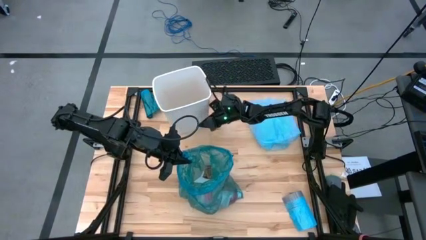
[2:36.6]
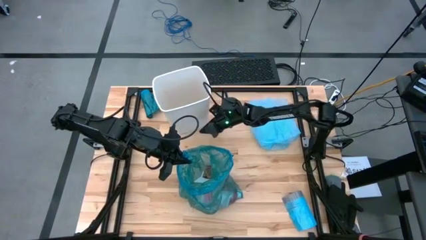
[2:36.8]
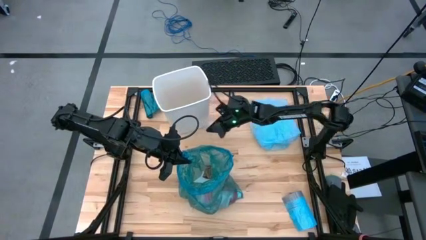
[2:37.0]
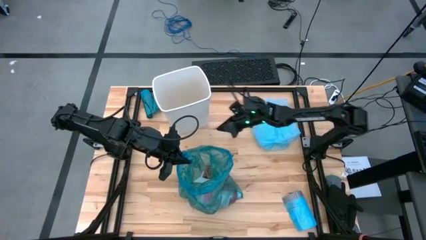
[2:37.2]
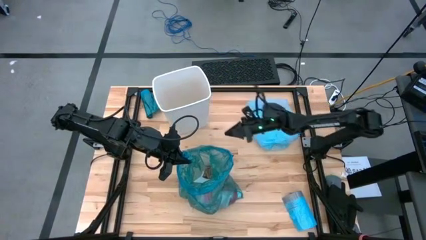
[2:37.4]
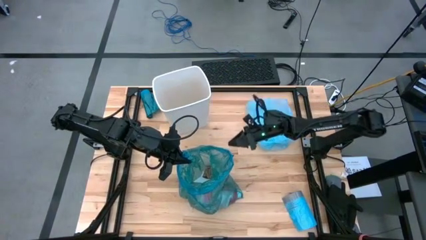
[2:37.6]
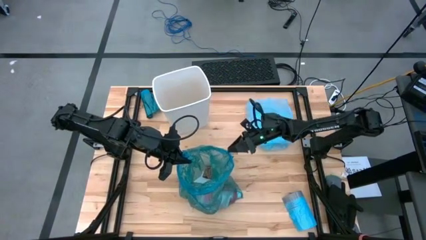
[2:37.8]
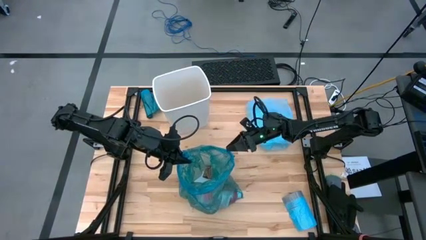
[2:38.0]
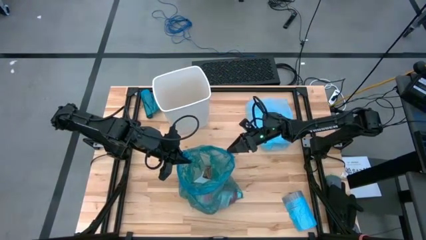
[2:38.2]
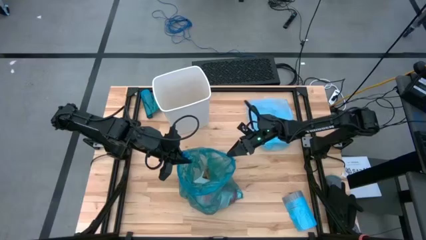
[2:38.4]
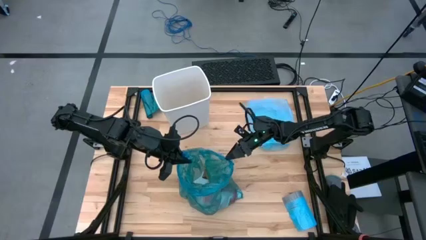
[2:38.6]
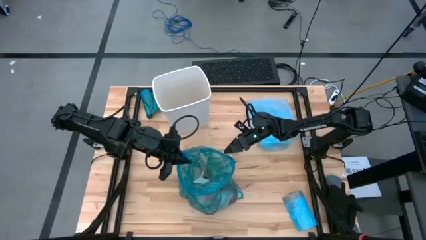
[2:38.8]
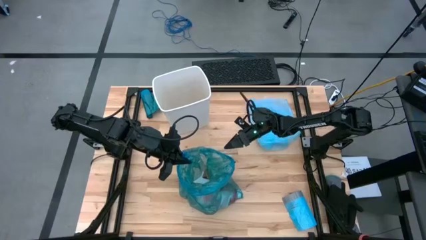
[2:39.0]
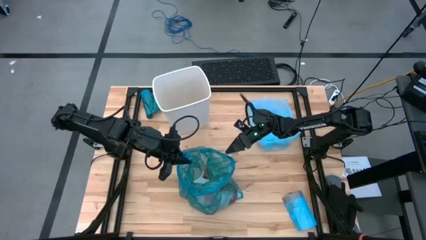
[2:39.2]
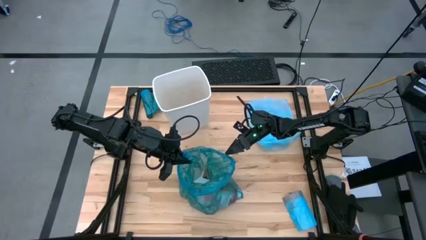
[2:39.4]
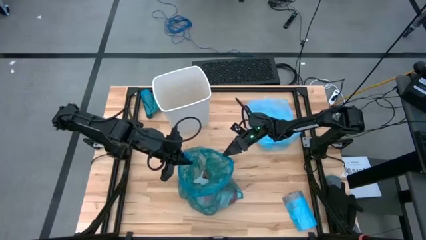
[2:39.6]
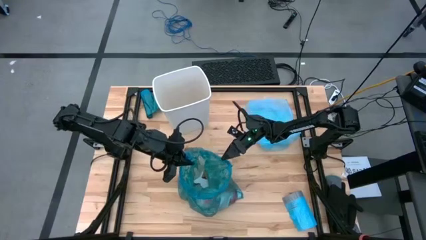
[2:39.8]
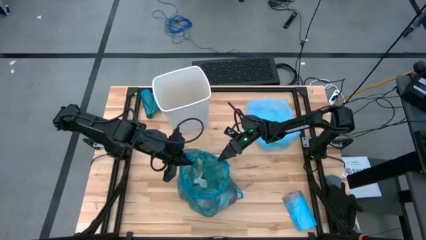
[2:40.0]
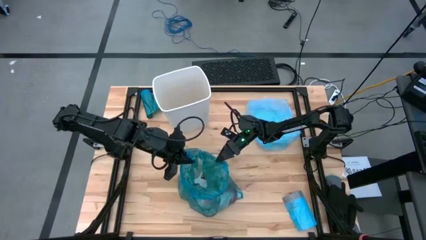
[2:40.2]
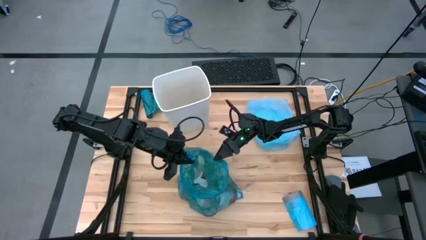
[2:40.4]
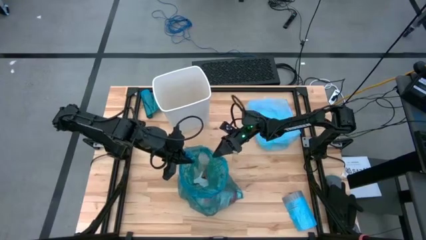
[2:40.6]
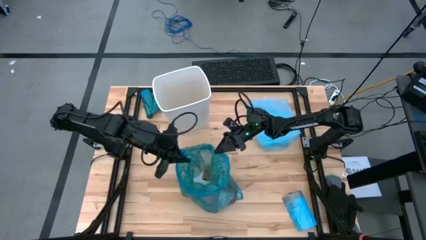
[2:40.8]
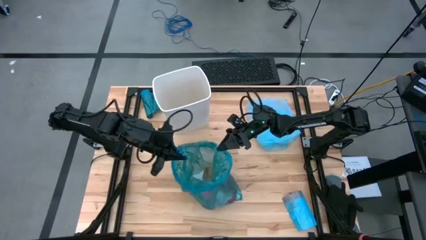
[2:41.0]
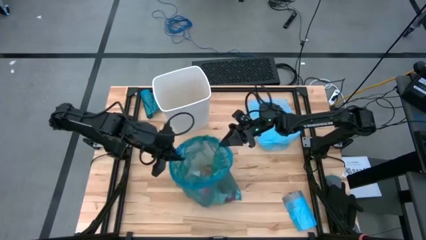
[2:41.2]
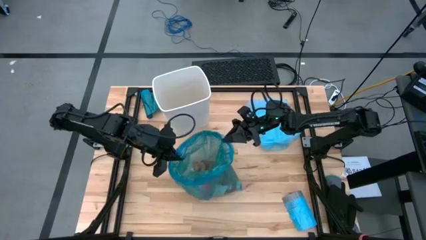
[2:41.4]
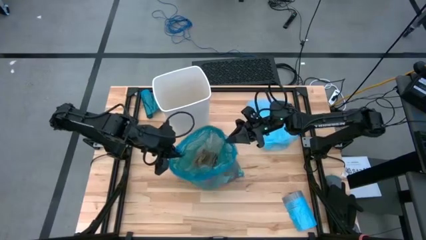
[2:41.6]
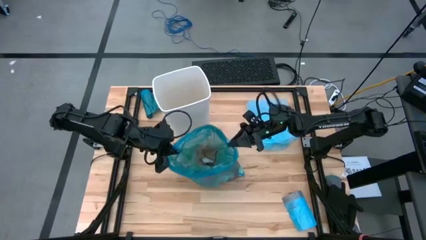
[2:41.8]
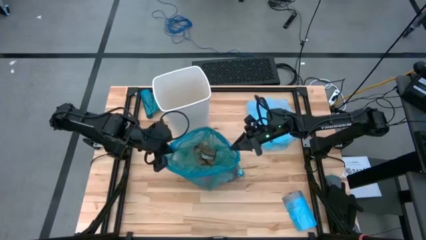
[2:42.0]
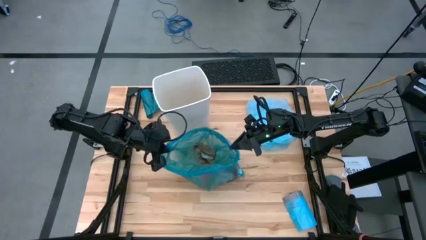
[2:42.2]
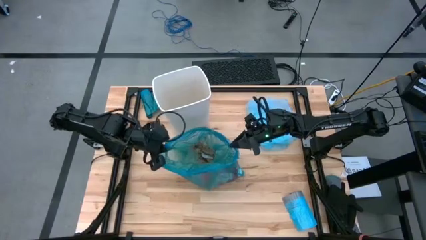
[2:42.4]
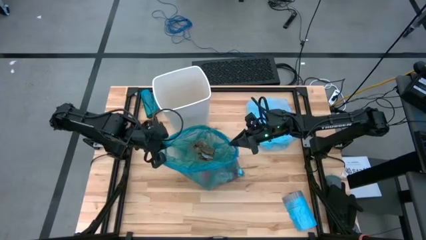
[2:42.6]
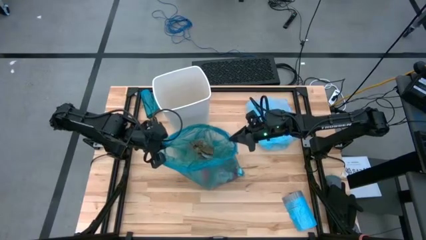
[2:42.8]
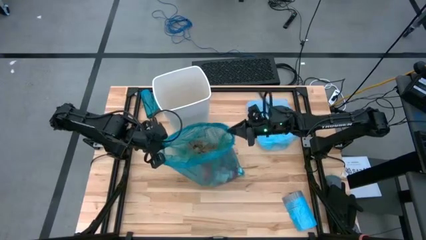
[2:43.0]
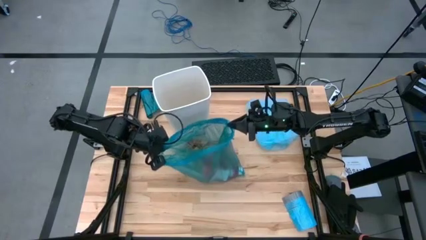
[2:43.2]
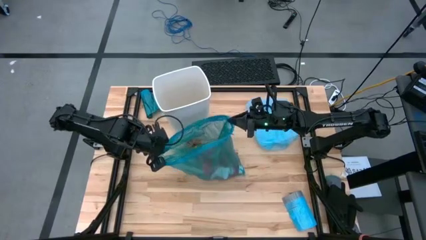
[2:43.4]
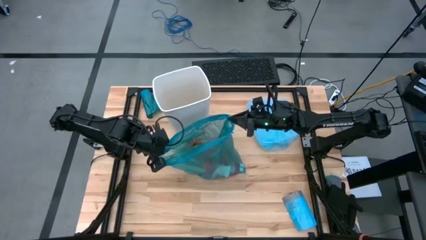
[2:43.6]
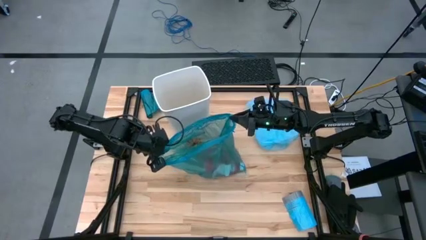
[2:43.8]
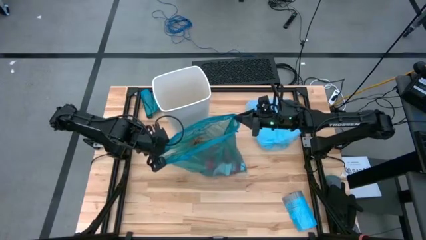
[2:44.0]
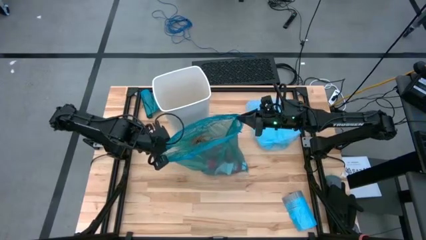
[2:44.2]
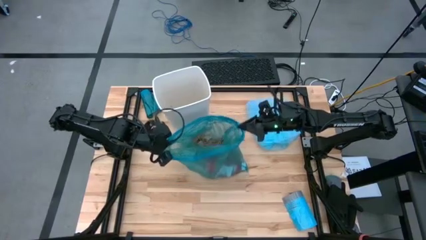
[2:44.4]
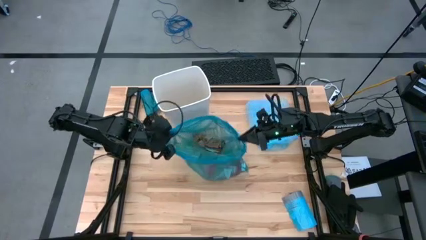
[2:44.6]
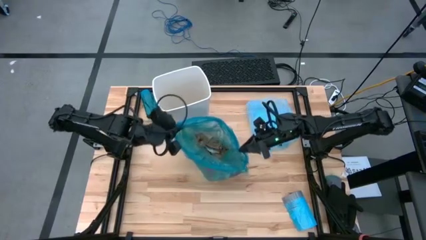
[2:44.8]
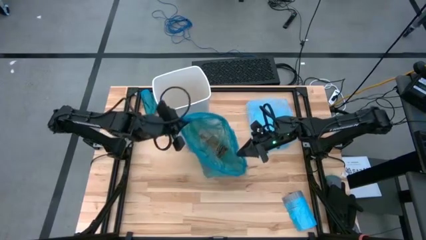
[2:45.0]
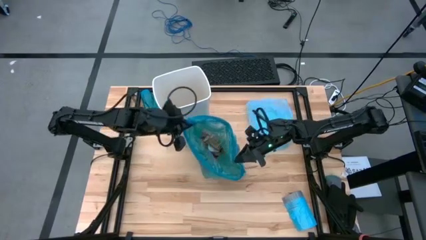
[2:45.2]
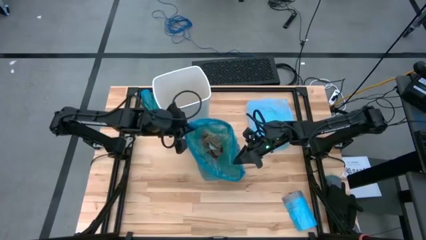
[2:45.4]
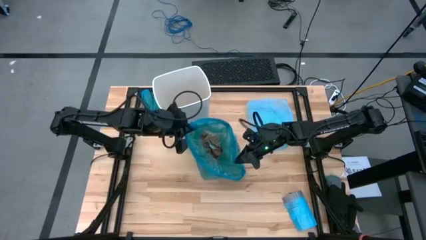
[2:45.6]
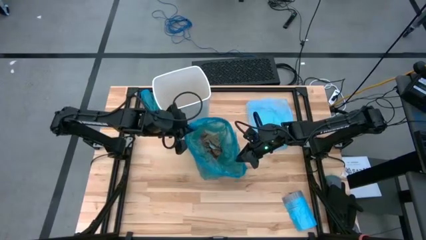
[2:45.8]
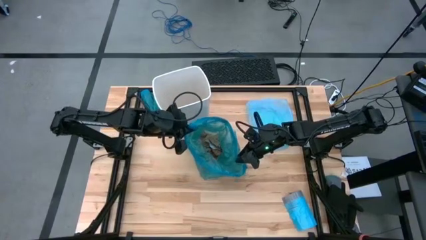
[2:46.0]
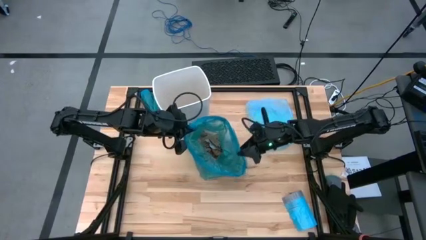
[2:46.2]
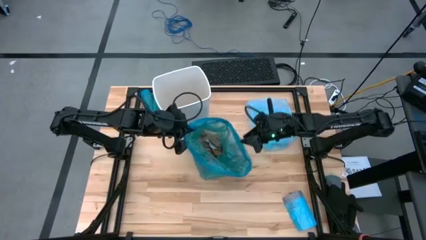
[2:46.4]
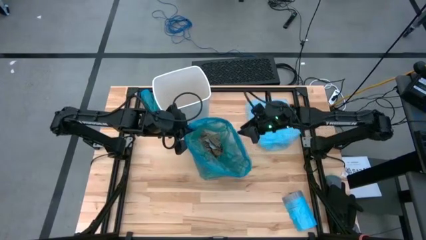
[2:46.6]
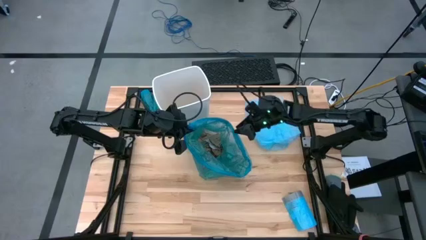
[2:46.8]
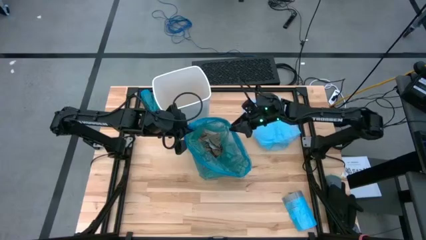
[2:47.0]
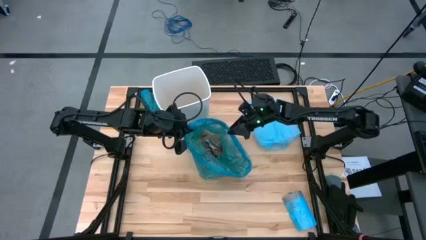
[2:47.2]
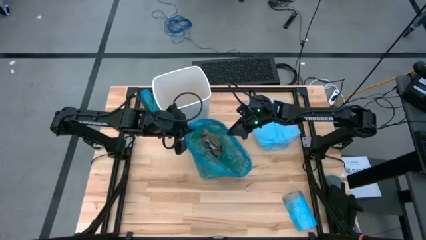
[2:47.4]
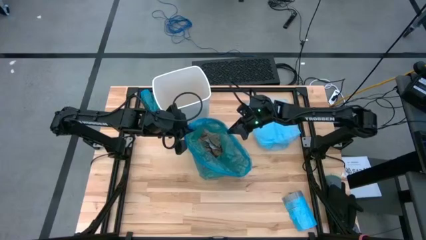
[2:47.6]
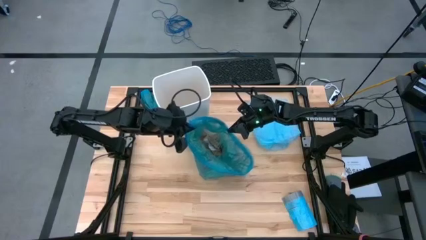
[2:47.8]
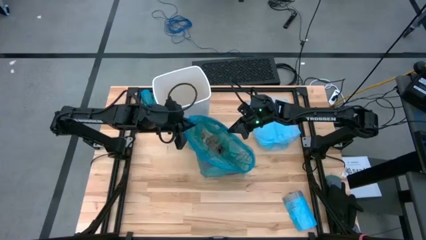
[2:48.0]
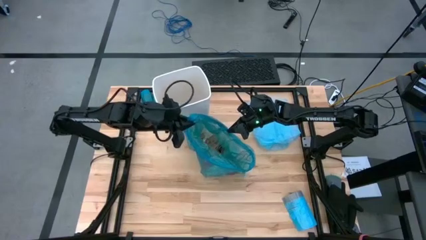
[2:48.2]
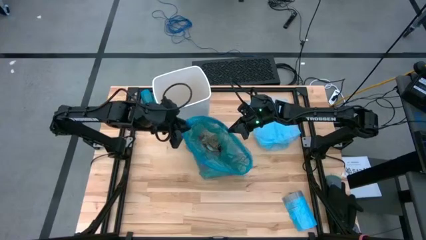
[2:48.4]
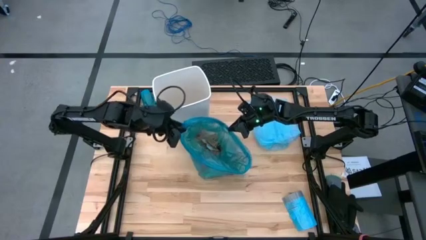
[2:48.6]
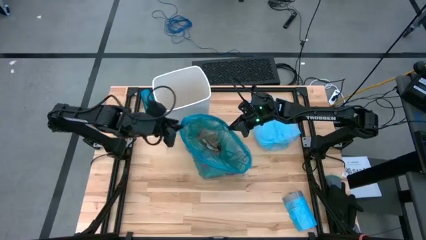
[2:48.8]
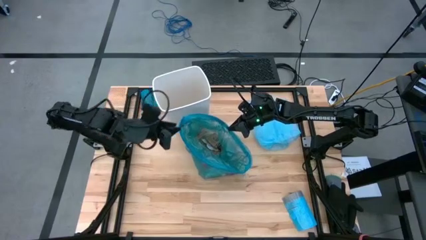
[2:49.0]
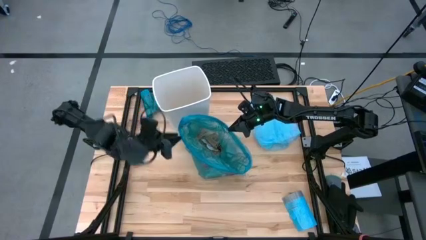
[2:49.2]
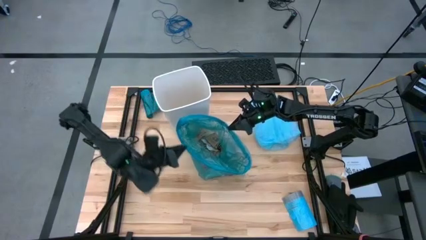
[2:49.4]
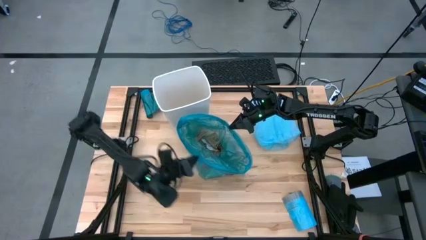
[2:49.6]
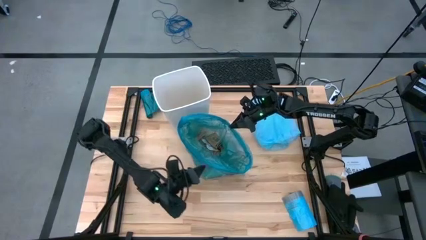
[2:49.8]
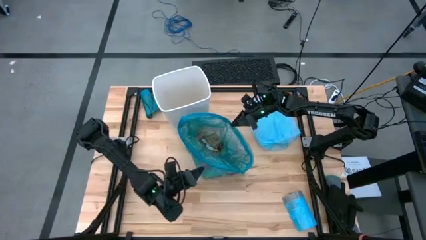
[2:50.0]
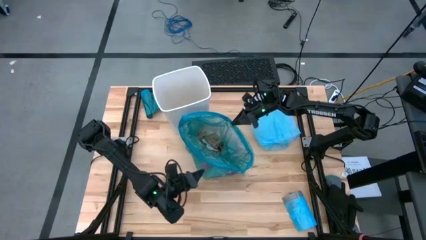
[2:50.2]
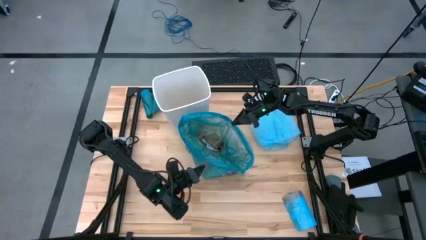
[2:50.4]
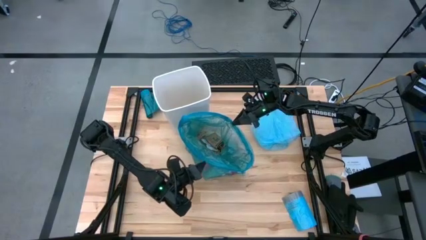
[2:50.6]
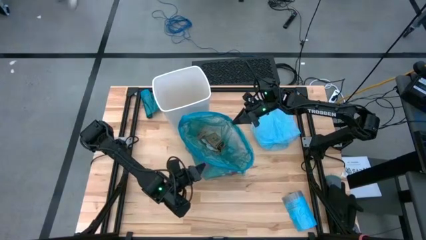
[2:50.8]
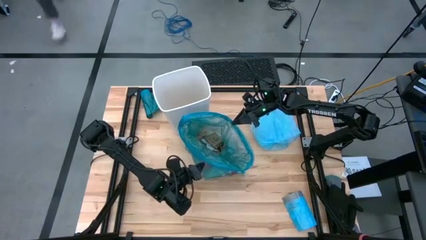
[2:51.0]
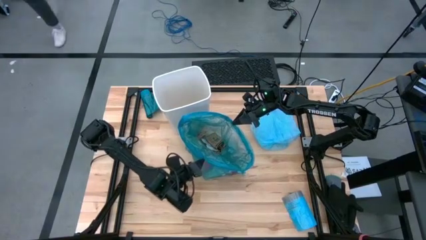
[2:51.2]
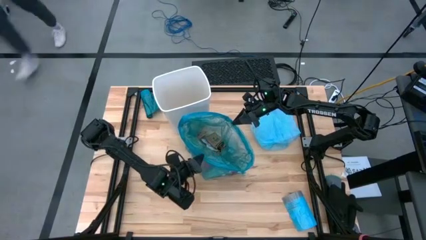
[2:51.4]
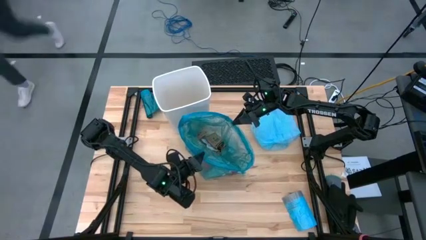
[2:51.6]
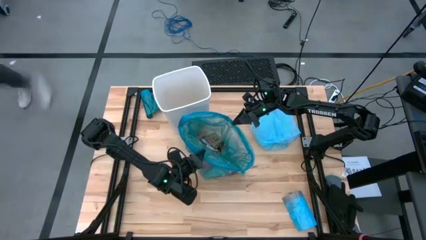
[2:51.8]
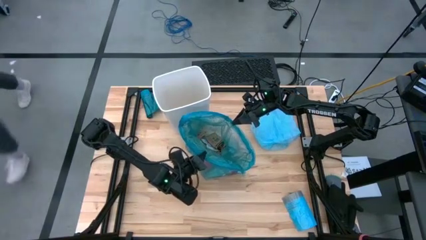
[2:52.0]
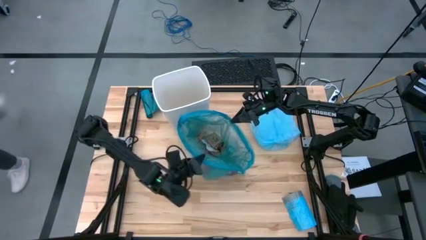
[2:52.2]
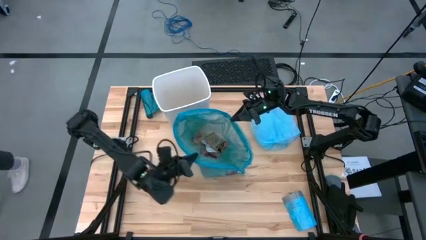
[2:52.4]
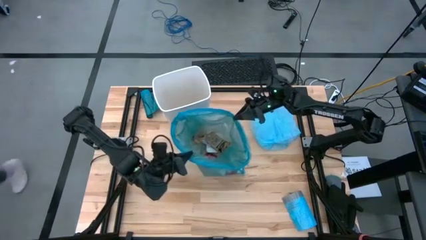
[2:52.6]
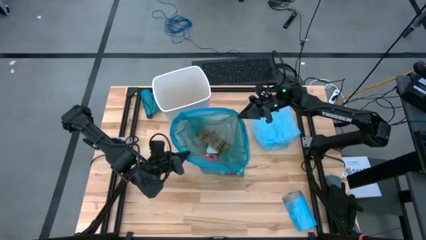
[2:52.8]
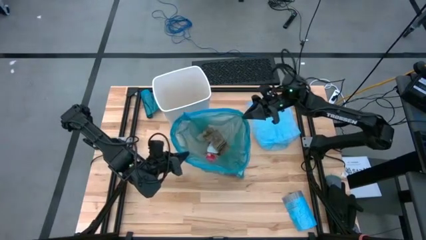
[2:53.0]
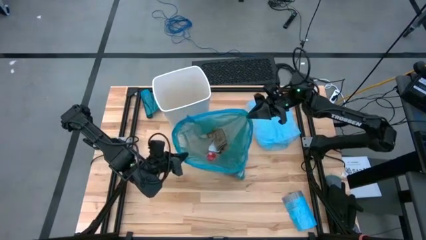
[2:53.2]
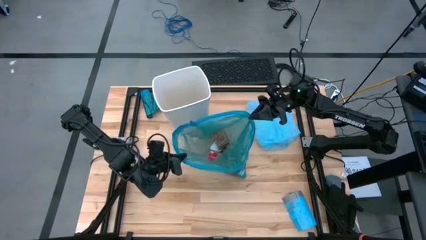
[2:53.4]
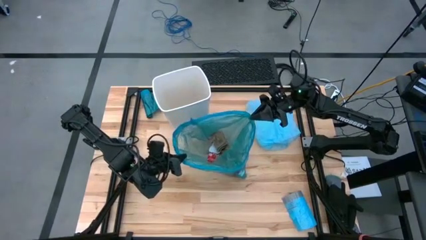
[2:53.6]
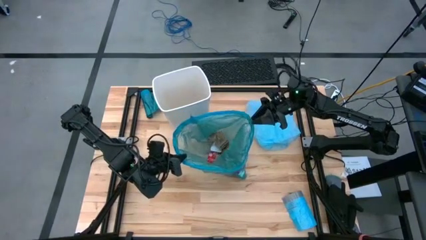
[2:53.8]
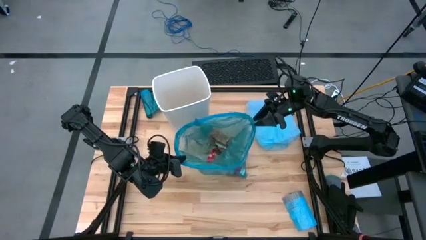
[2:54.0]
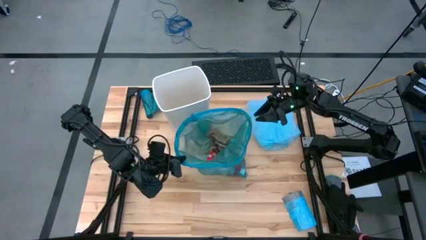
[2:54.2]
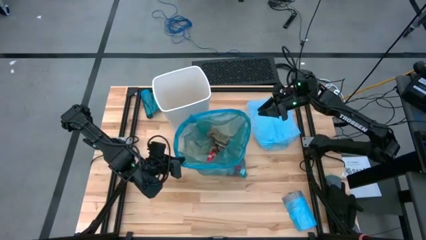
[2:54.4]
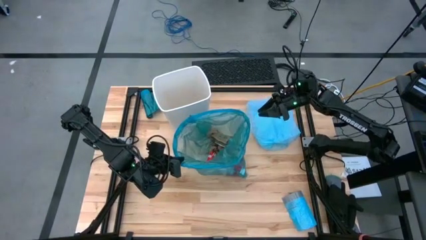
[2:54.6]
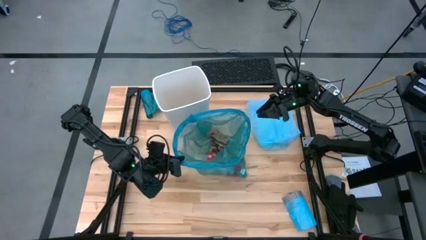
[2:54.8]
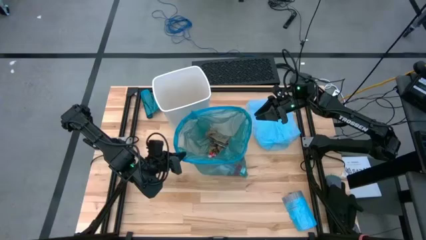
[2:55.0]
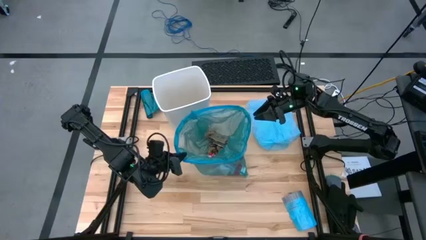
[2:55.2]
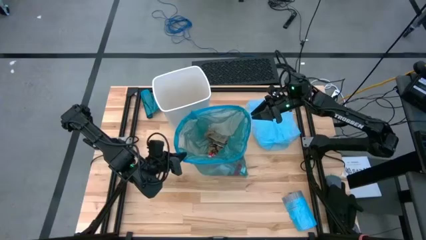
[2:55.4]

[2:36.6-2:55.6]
Task: place trash/remove bag and relplace
Close the blue trash bag
